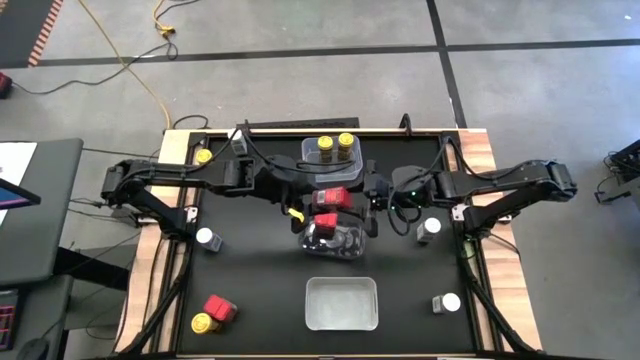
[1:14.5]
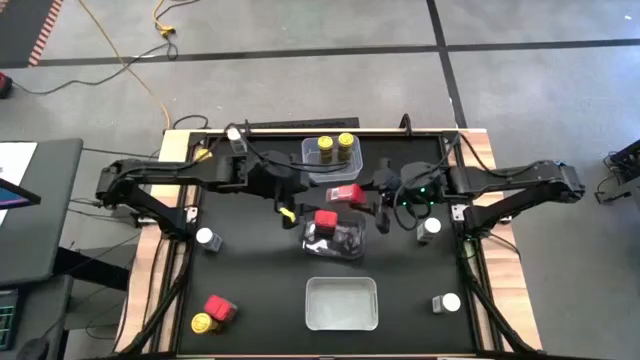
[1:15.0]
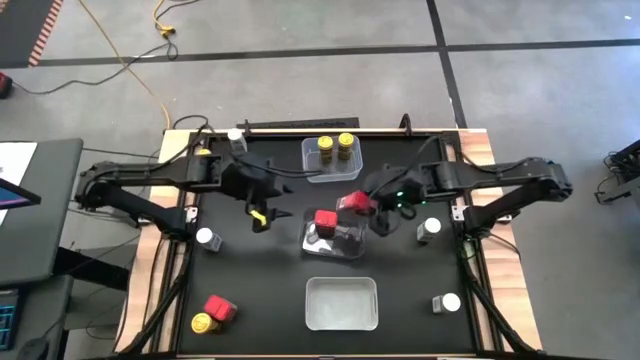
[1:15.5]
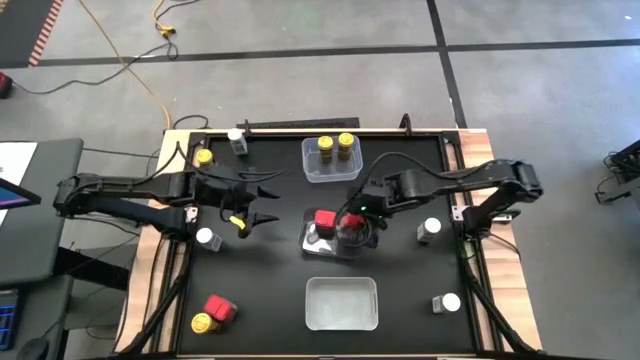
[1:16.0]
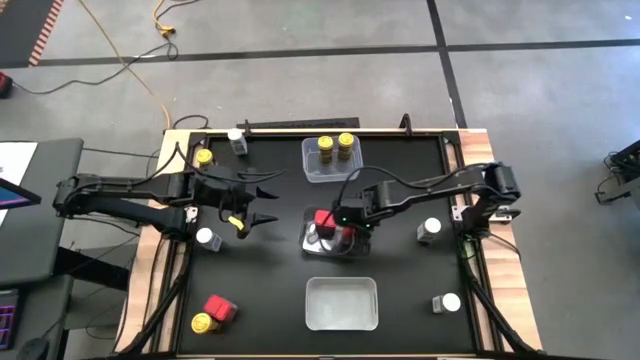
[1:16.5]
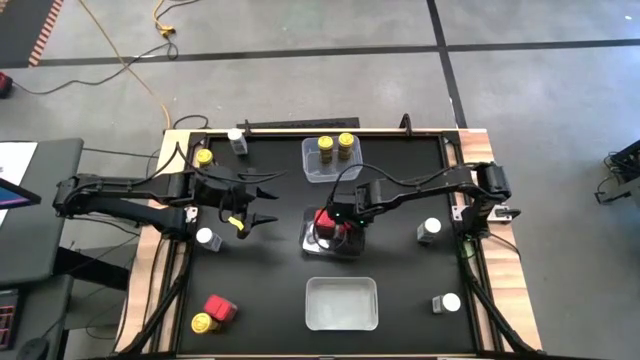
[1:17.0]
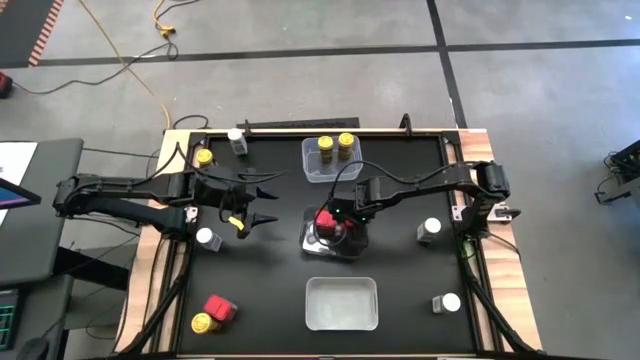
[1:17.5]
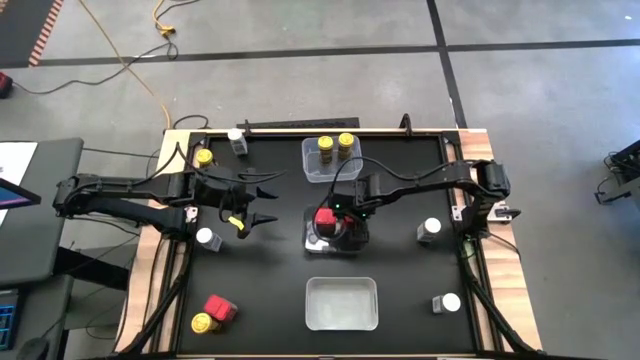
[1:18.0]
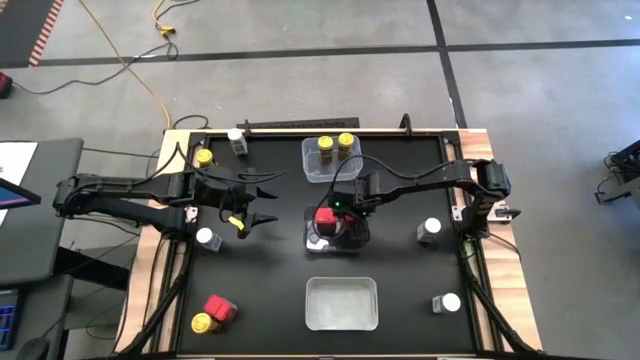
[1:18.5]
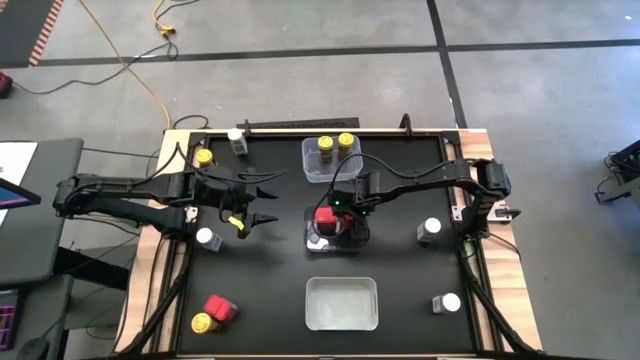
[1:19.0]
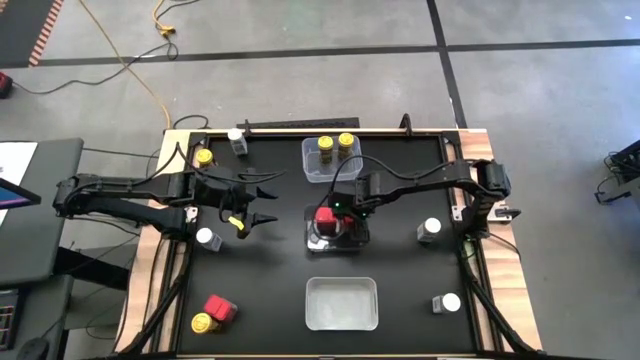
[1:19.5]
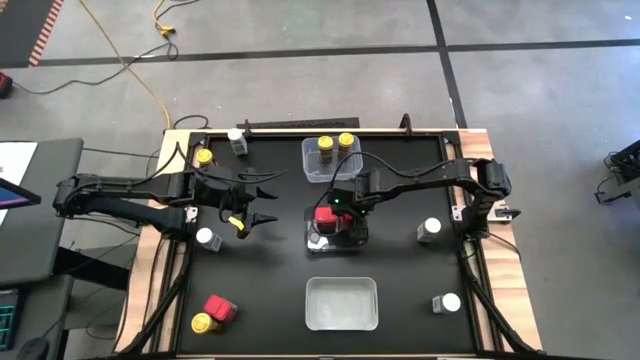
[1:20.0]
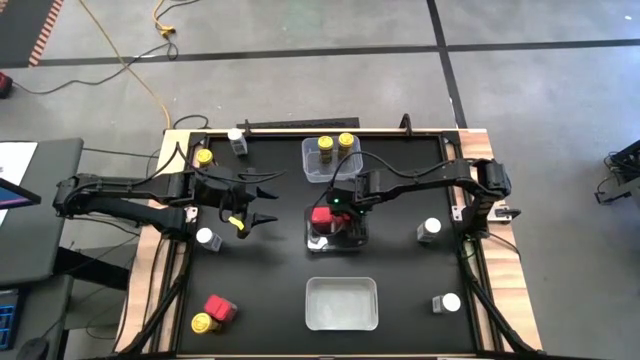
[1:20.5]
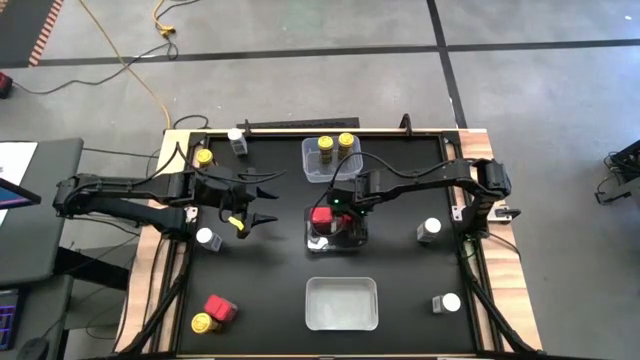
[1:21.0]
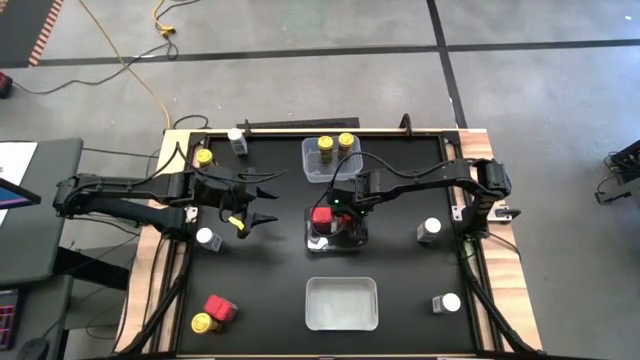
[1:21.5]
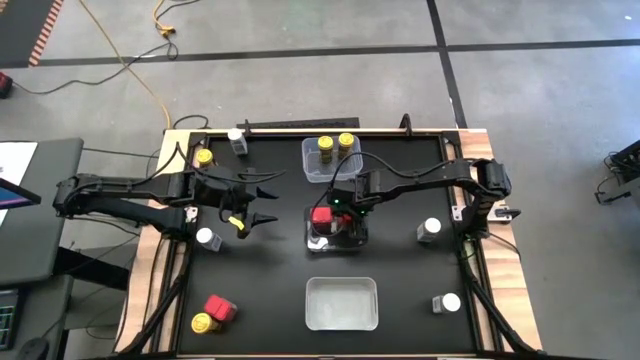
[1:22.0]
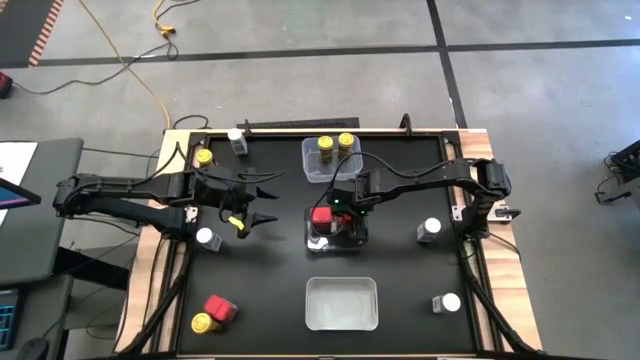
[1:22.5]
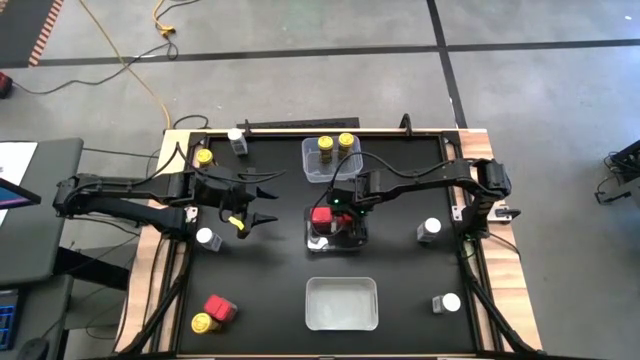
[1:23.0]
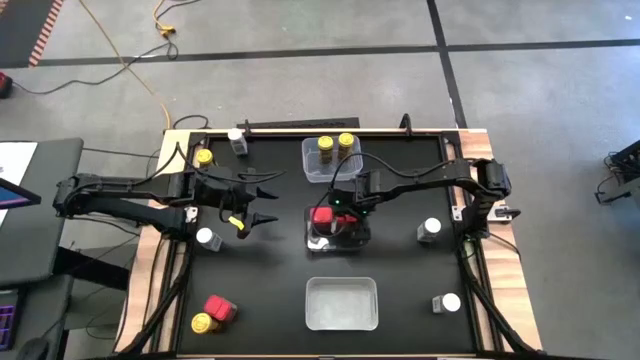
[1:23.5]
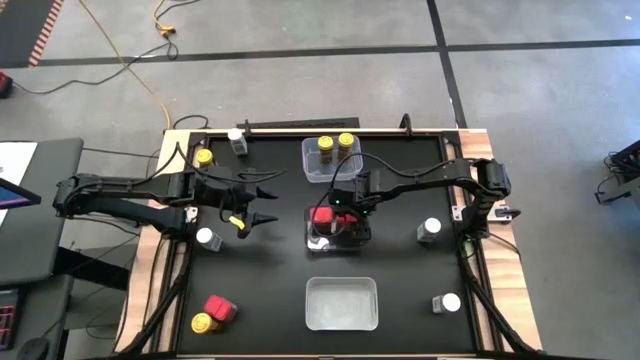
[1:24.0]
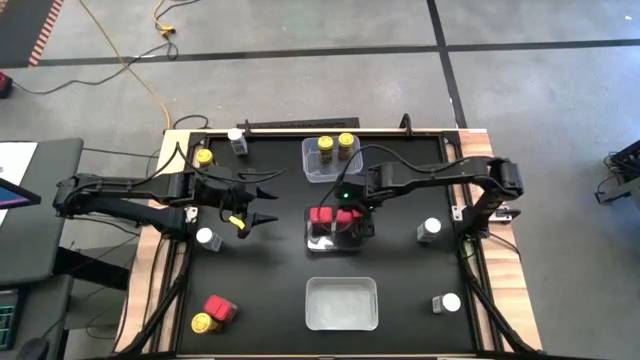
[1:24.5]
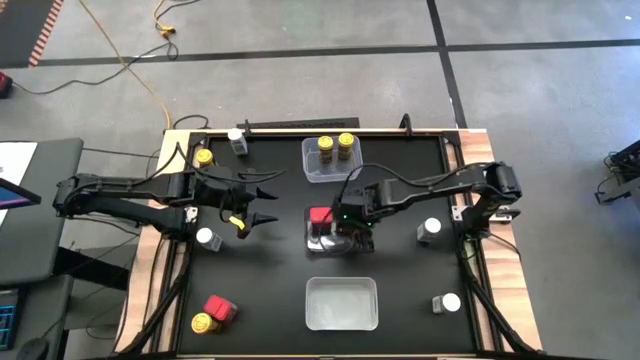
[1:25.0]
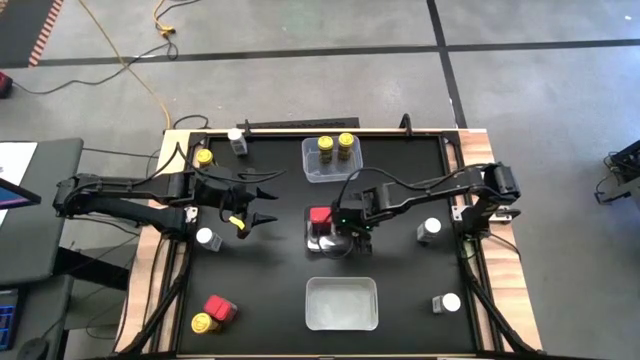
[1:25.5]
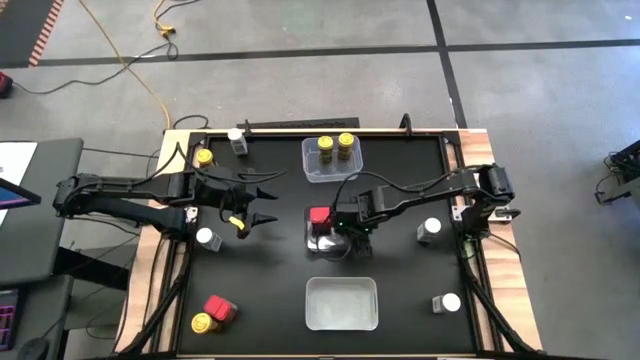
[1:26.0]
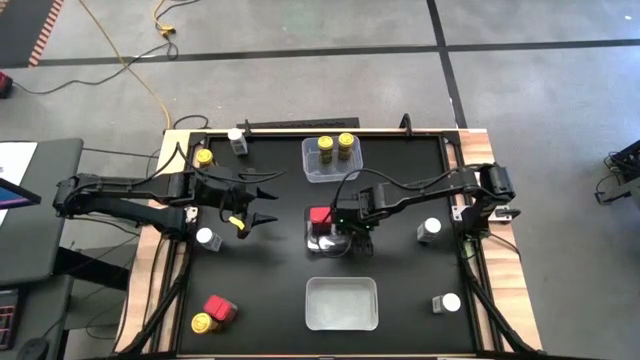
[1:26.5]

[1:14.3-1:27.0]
Task: Sort spices by type
Put the right red seasoning can into the black bin

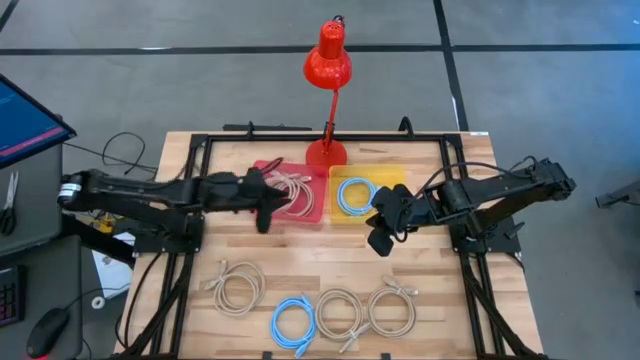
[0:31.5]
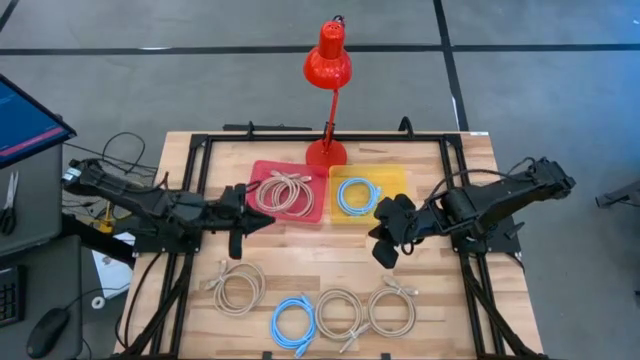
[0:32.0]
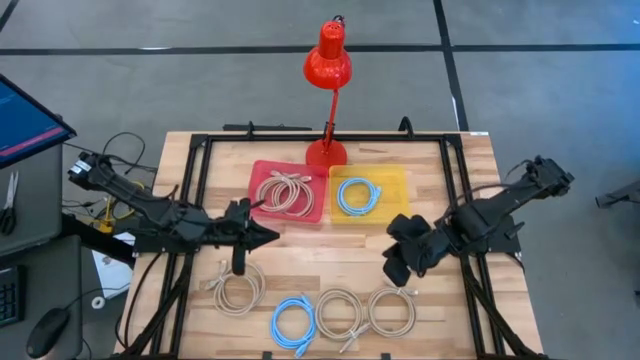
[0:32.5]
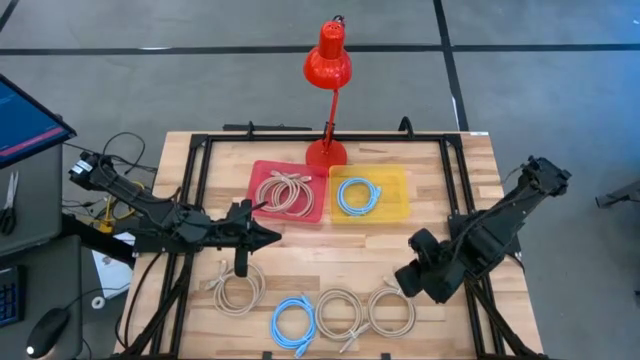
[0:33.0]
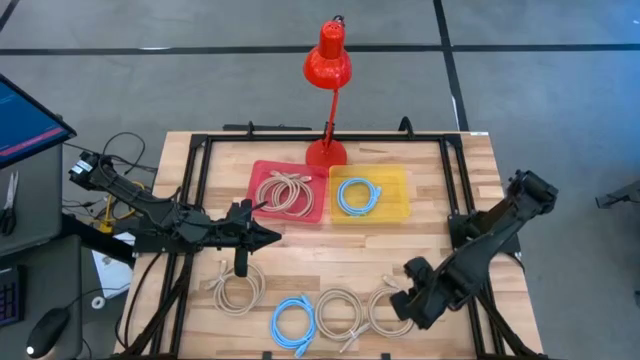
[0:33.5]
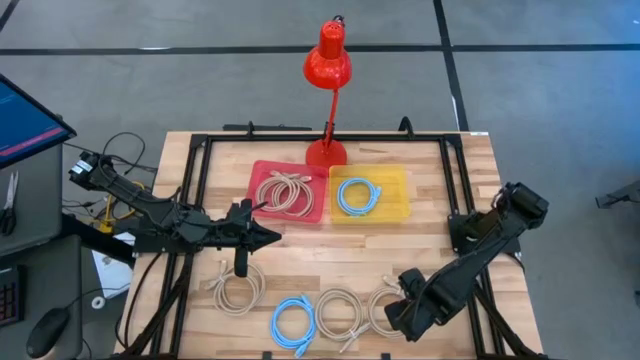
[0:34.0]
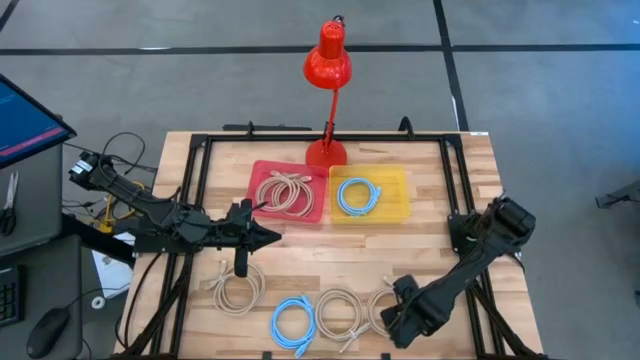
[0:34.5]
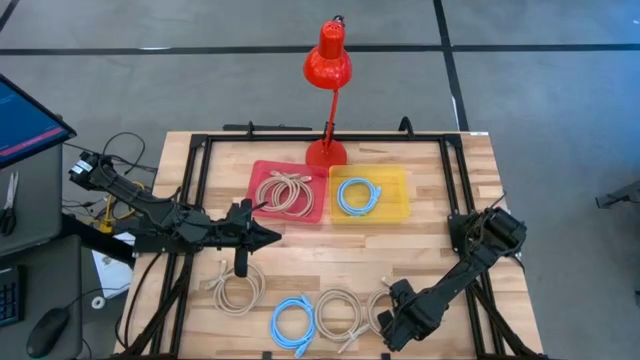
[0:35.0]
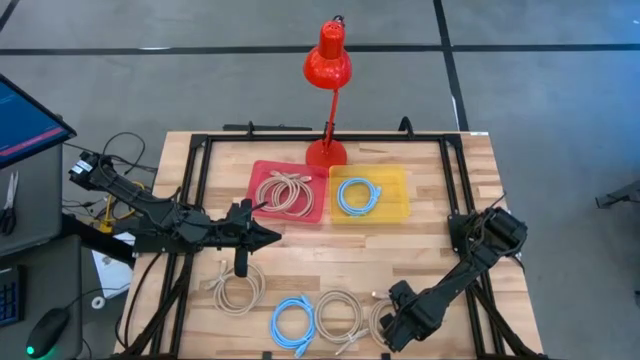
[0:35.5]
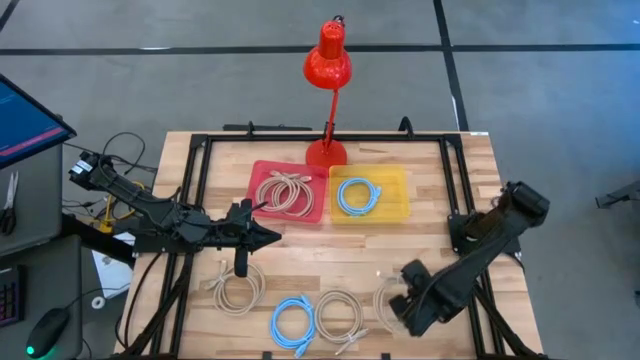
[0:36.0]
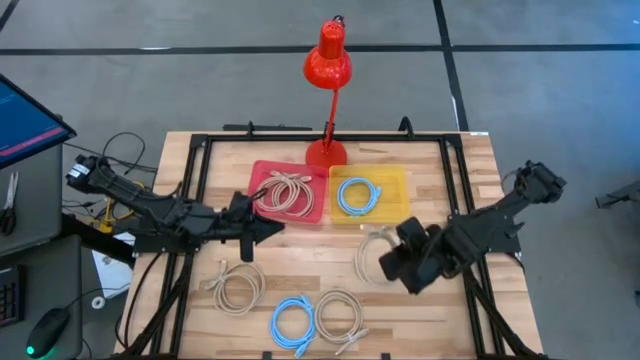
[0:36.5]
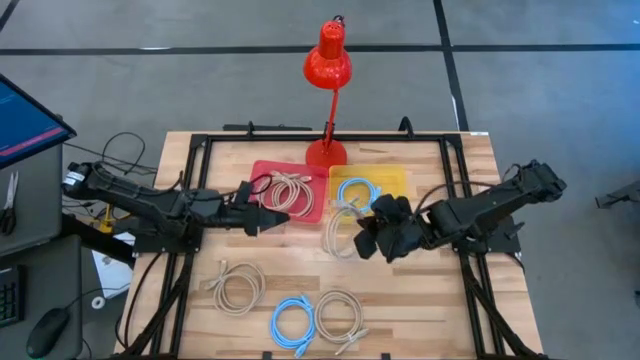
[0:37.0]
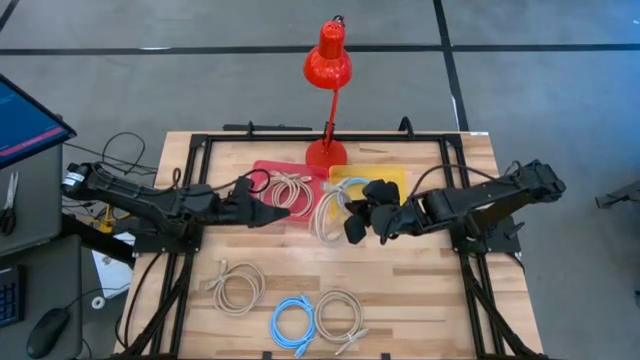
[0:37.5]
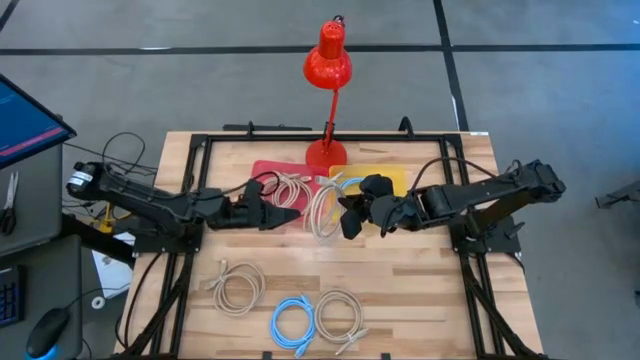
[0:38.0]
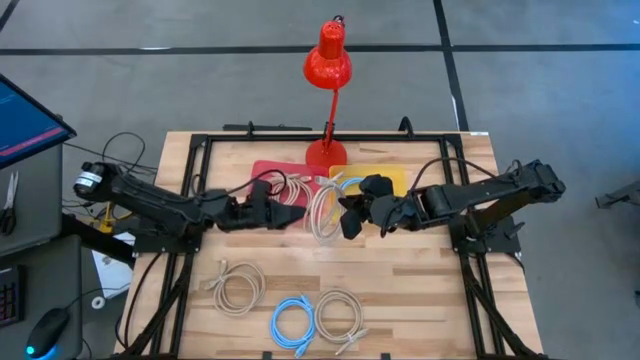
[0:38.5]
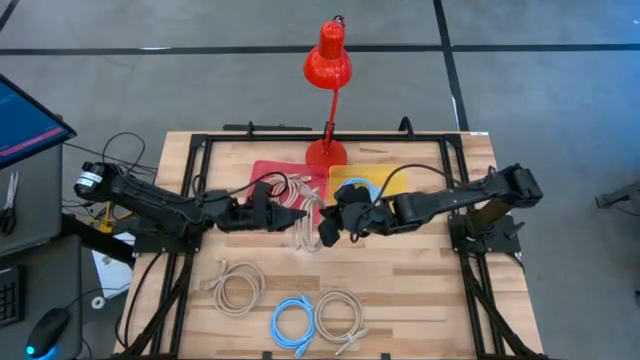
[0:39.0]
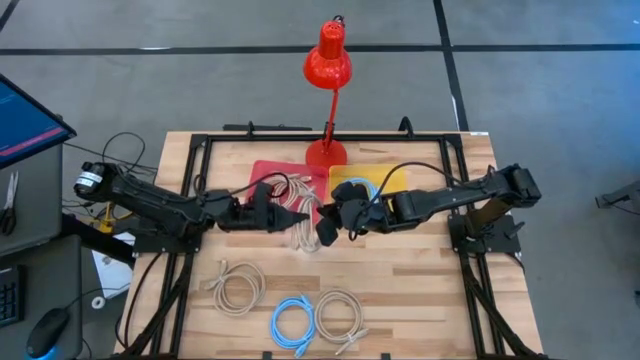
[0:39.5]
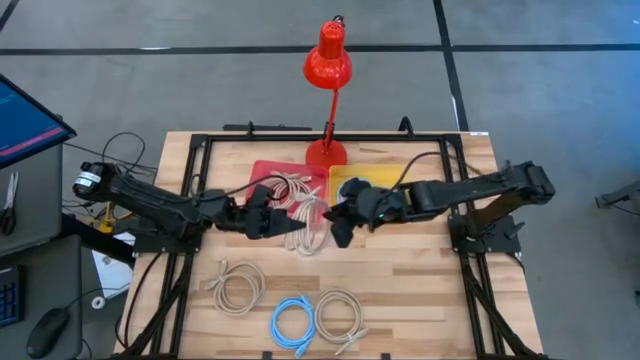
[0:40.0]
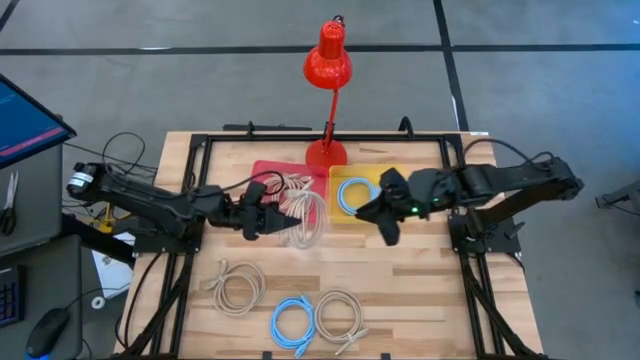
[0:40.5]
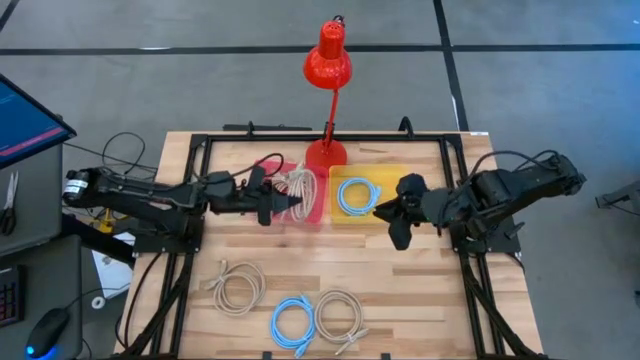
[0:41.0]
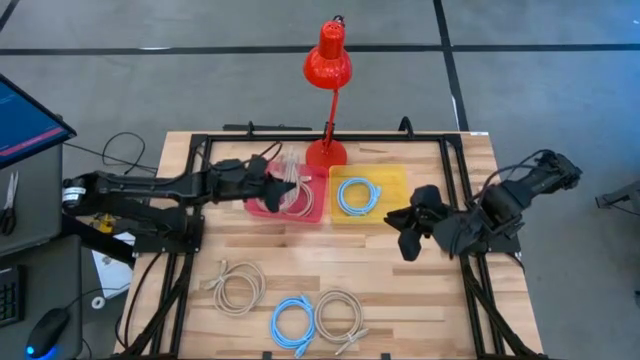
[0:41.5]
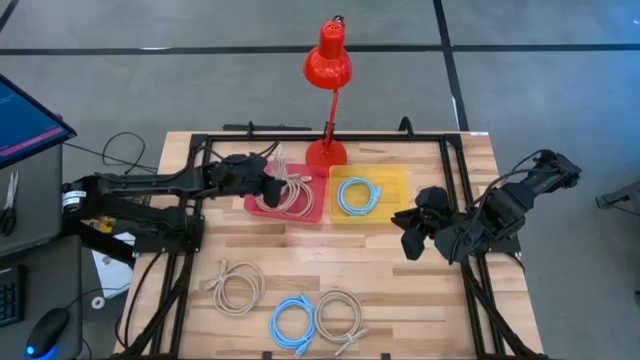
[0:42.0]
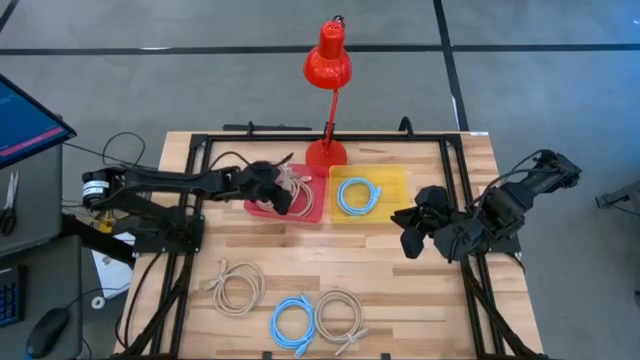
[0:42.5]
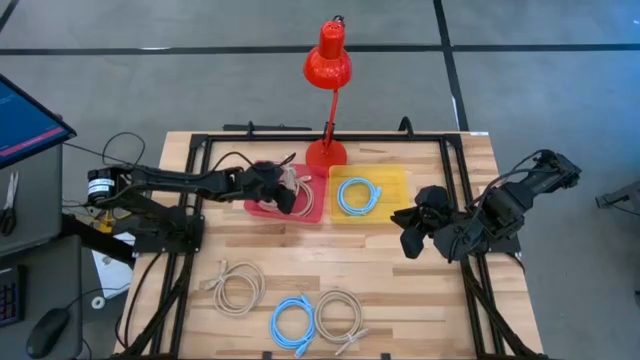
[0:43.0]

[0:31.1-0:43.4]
Task: Sort HDMI cables
Put the brown HDMI cable into the red bin
